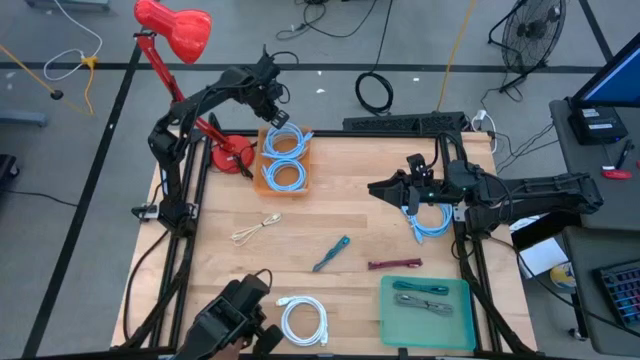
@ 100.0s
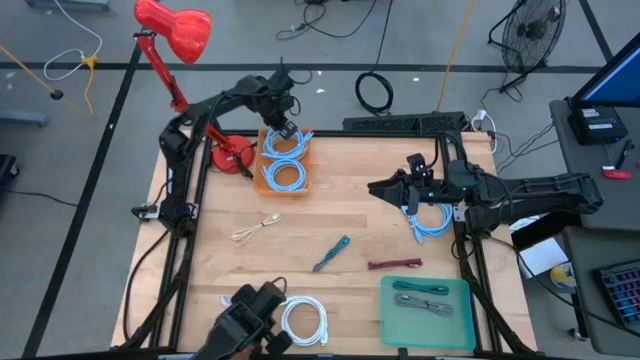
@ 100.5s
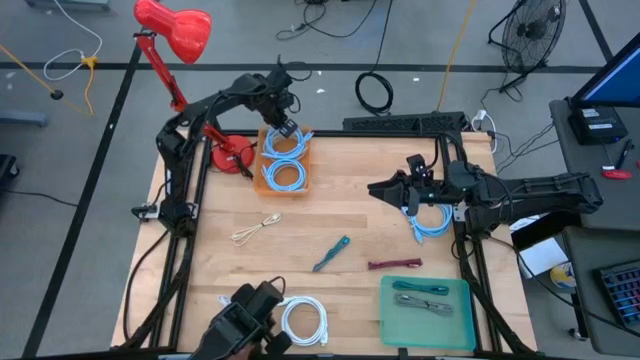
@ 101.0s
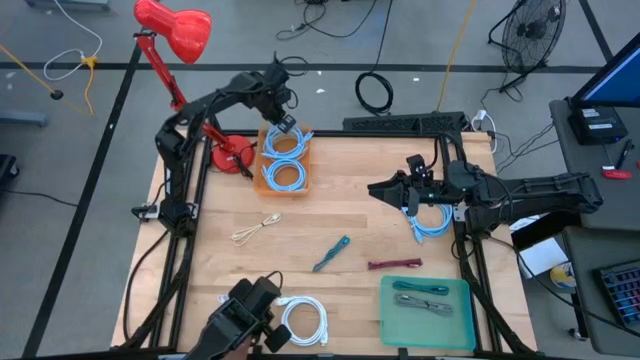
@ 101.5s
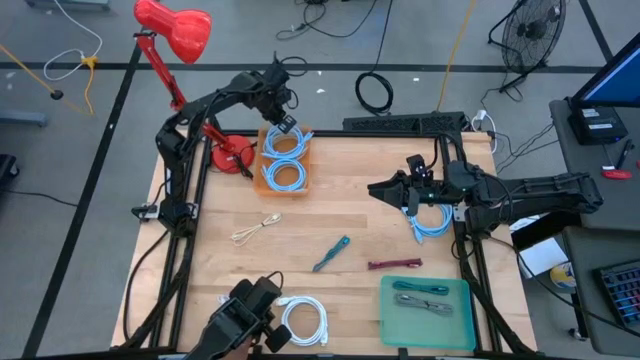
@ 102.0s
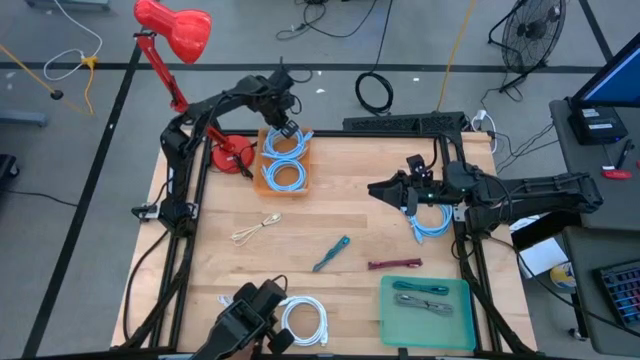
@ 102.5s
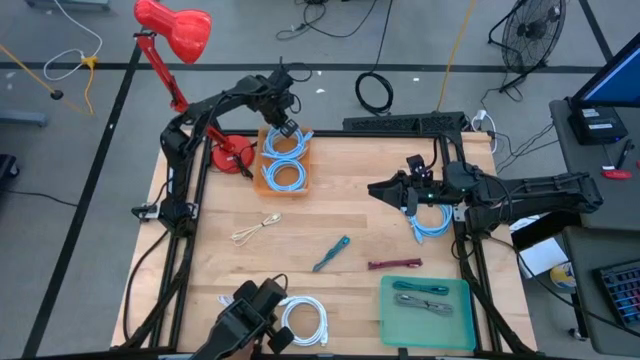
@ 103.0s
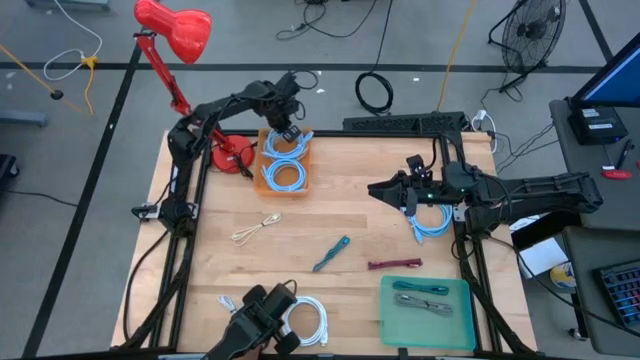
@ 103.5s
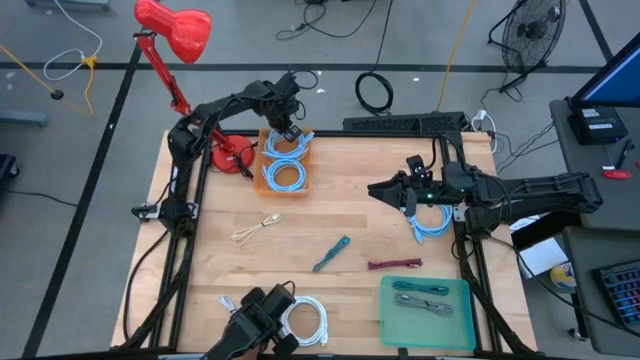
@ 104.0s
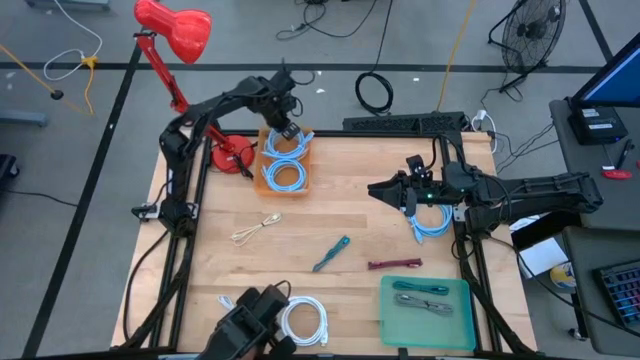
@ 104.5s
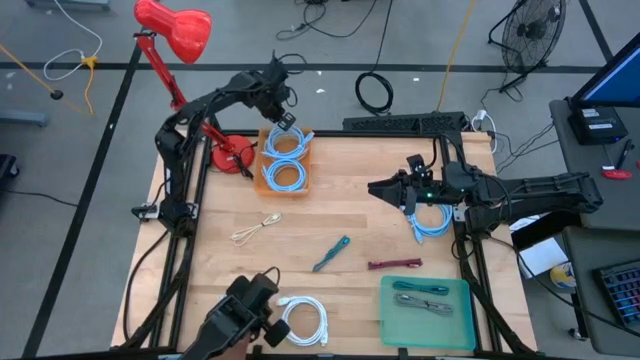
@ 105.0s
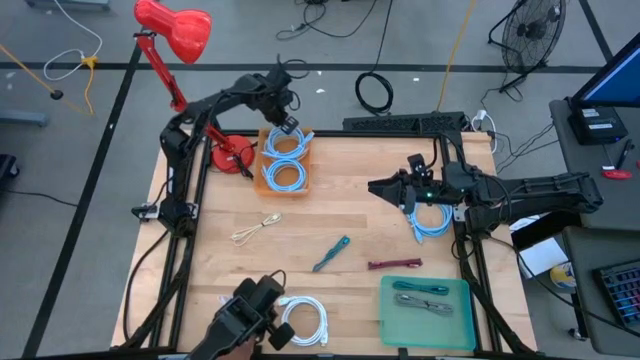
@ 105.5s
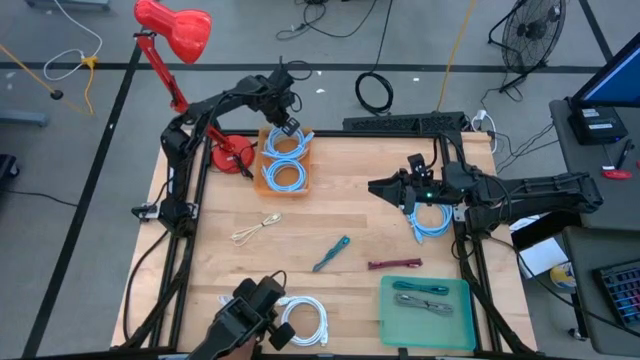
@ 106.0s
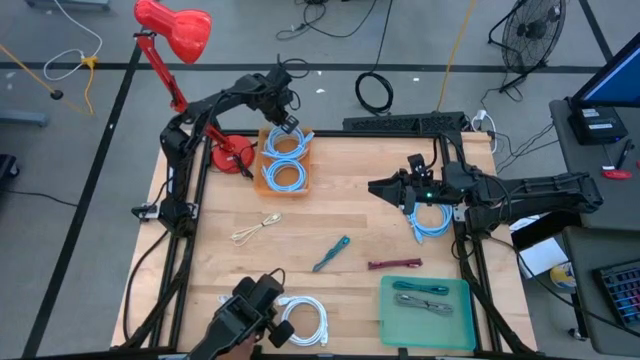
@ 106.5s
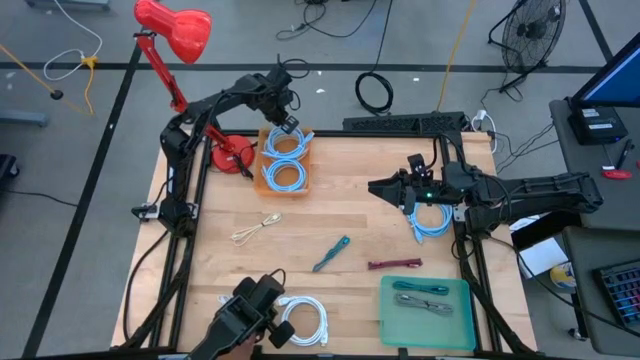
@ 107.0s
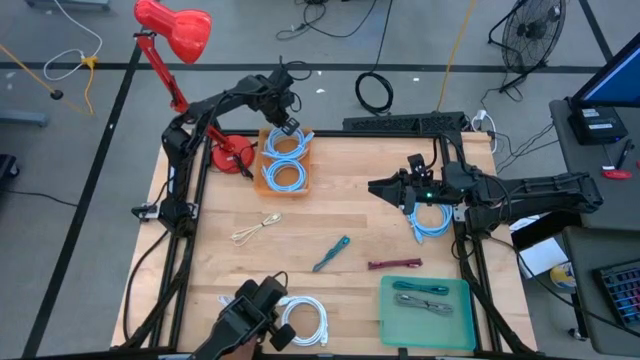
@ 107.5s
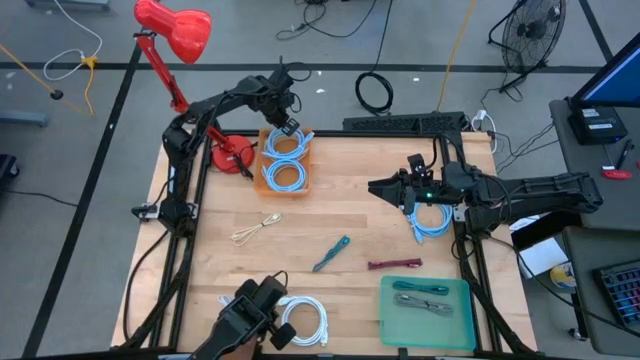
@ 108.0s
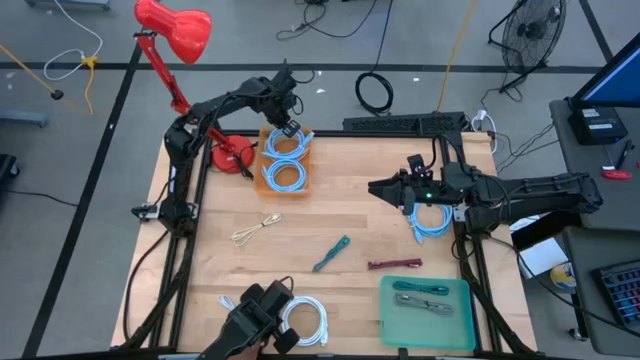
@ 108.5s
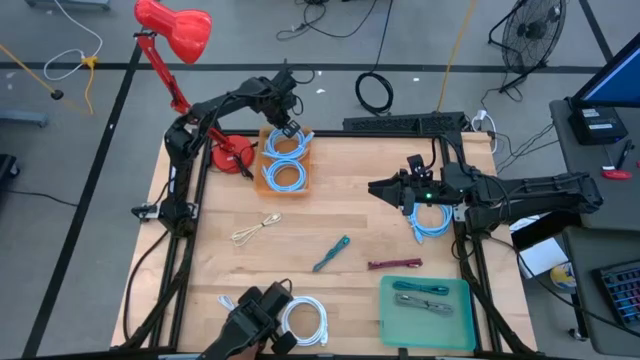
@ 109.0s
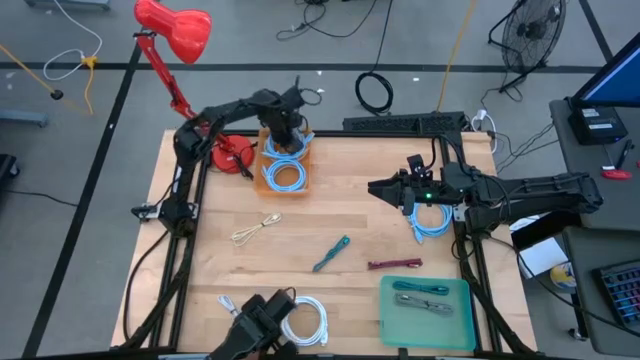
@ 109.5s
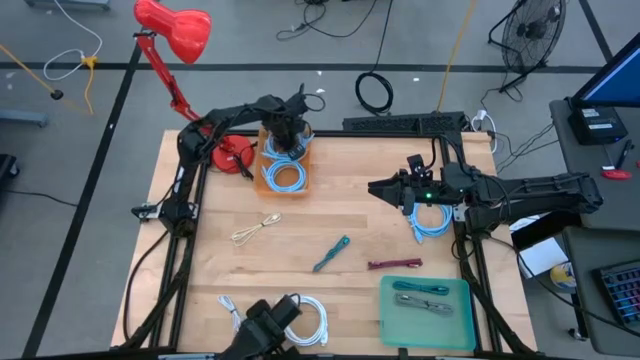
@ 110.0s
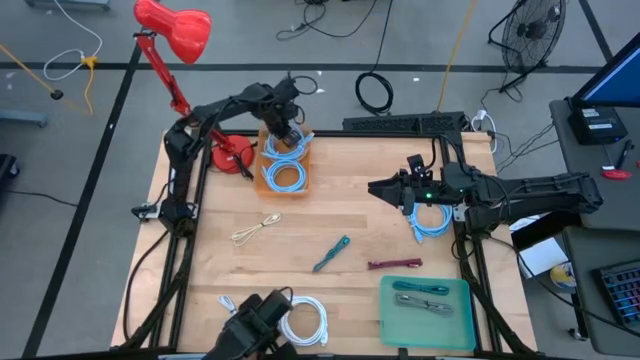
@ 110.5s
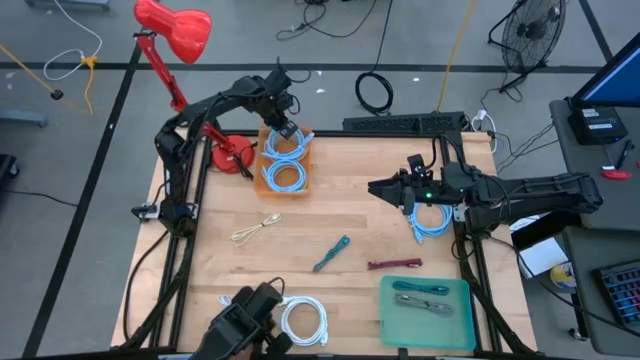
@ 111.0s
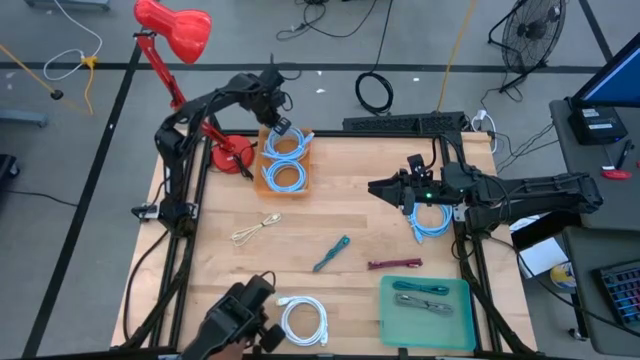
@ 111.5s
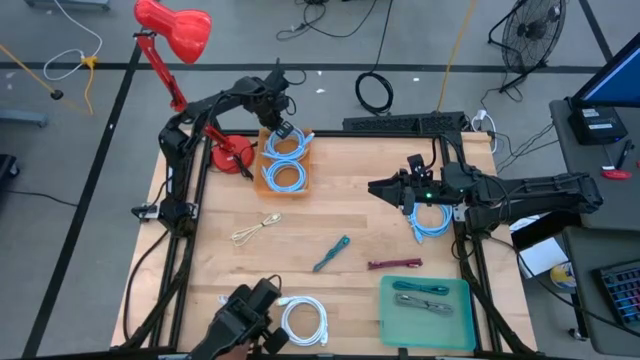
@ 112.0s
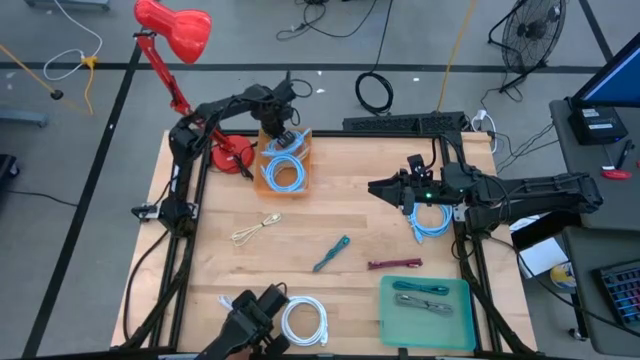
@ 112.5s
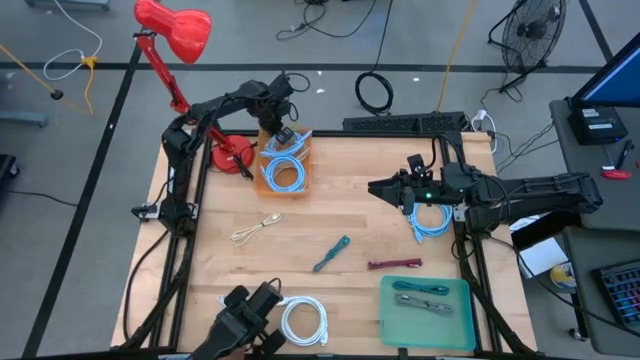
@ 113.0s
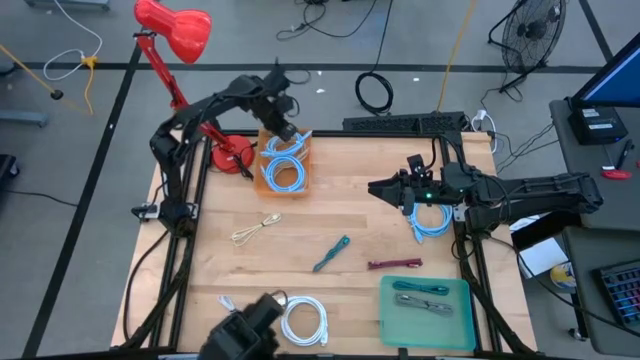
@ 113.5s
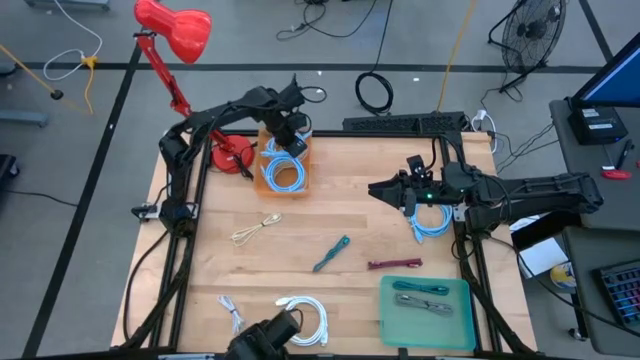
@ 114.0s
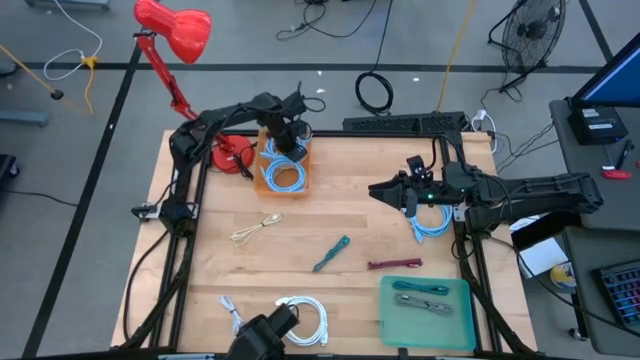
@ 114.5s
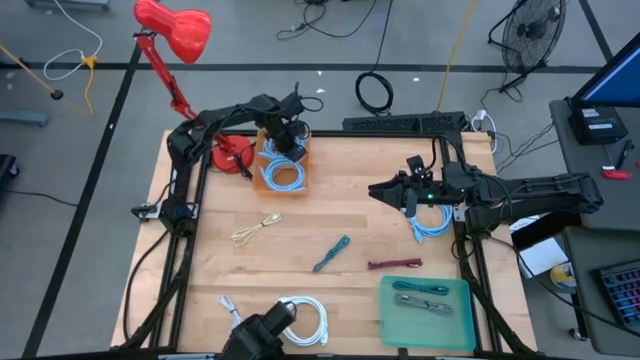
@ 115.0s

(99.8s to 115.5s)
Task: Pick & Place USB Port
Put the left light blue wire cable into the the orange bin

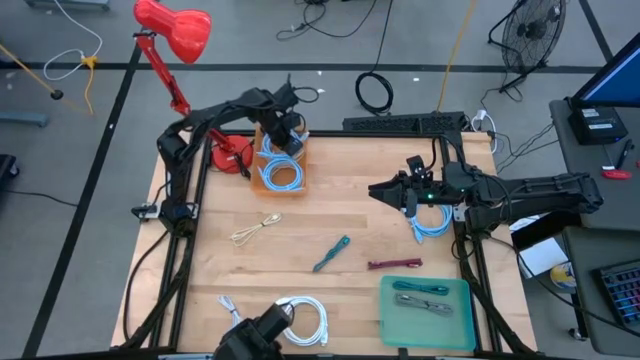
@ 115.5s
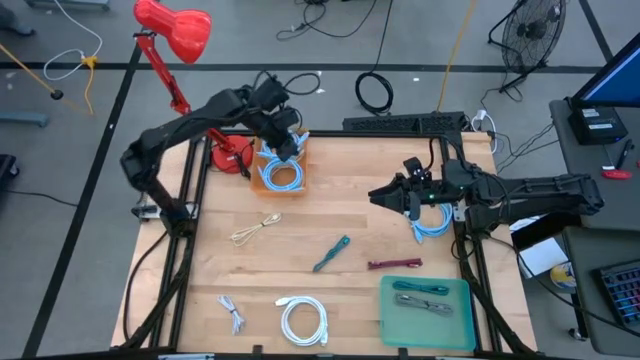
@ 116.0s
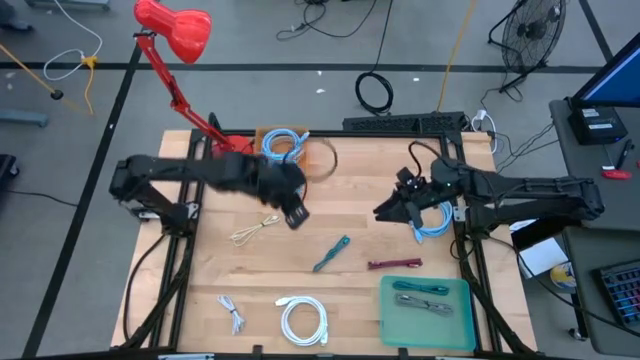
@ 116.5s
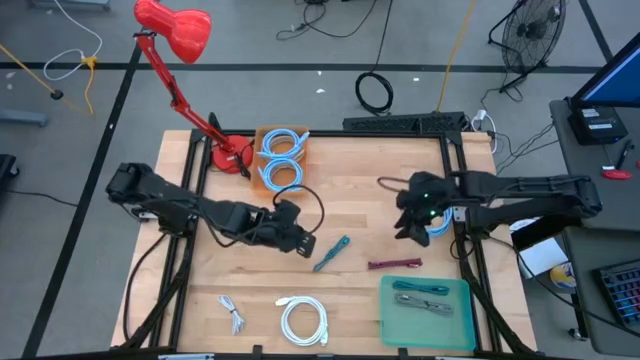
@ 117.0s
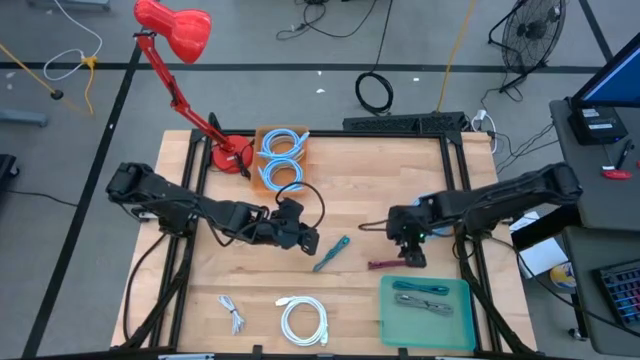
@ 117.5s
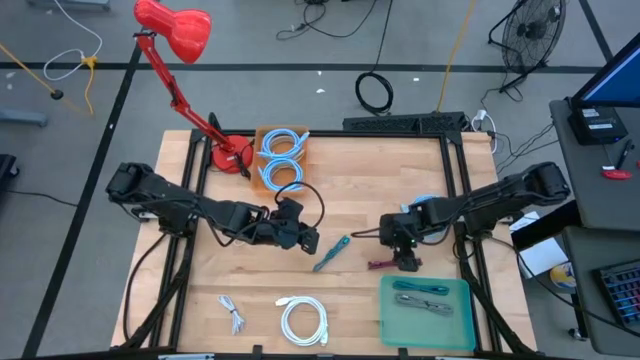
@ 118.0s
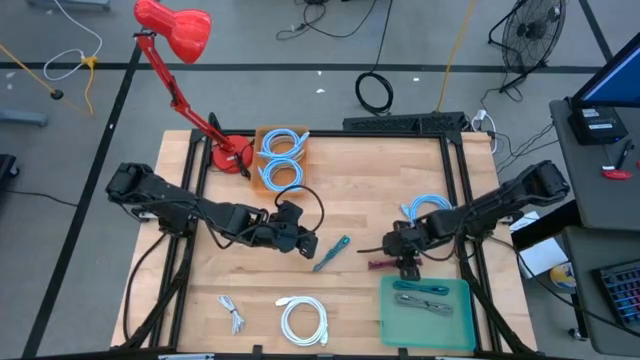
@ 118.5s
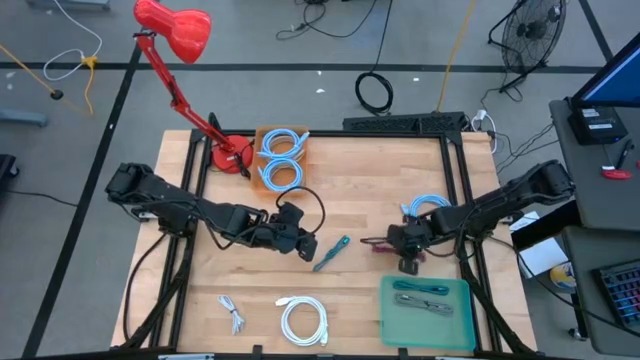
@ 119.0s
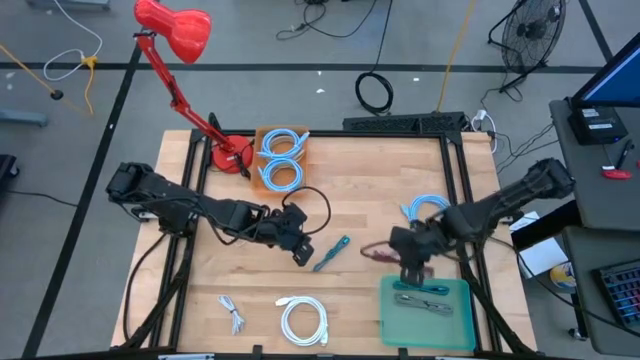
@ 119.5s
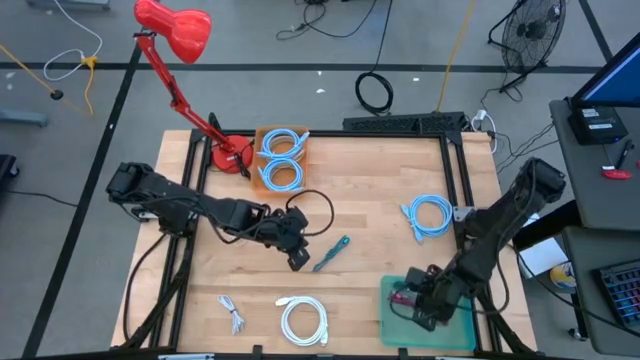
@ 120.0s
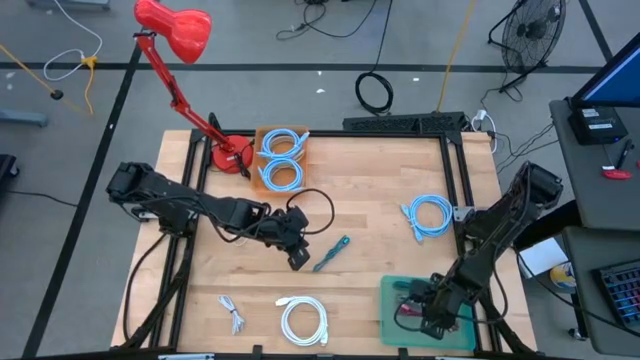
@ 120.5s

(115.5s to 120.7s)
Put the dark red charger cable into the green bin
